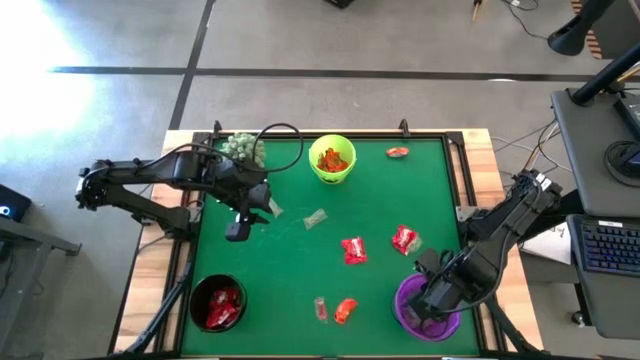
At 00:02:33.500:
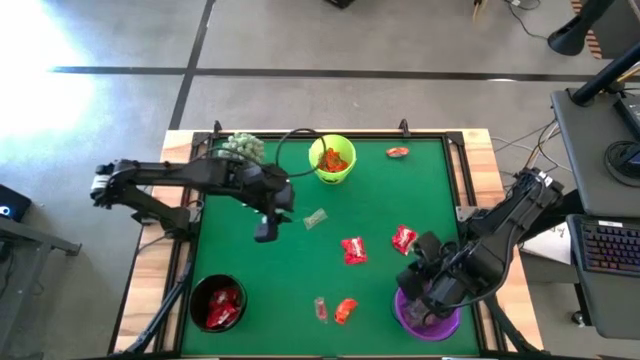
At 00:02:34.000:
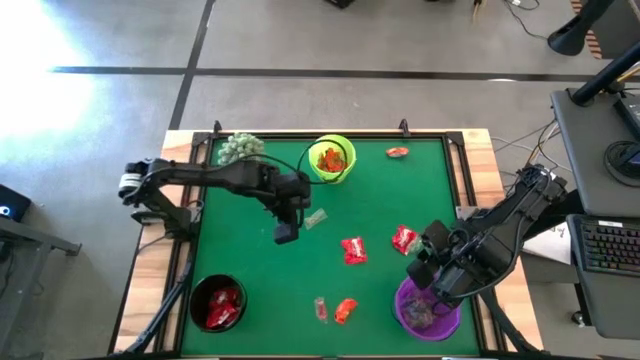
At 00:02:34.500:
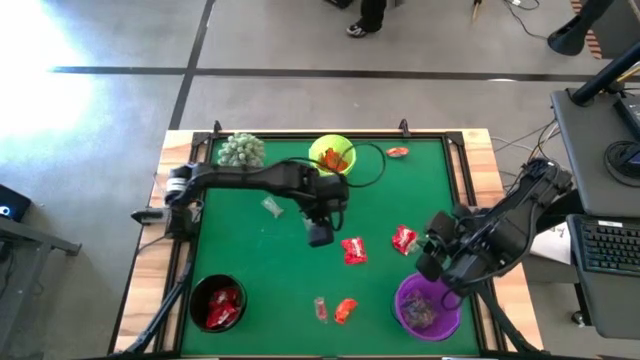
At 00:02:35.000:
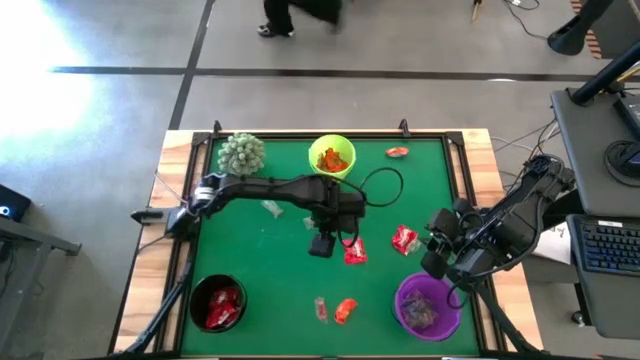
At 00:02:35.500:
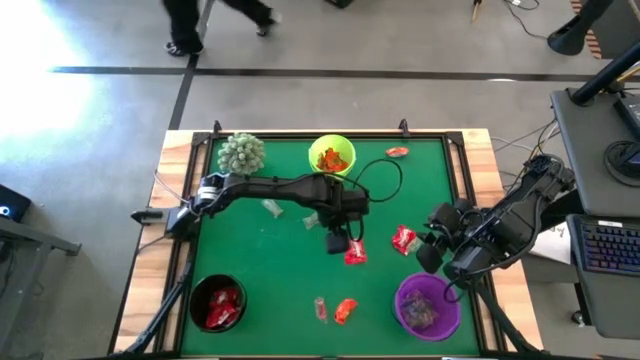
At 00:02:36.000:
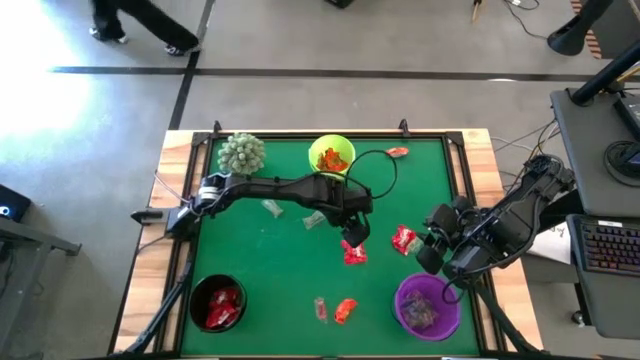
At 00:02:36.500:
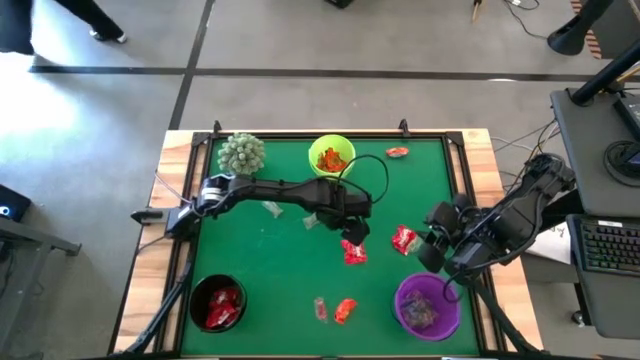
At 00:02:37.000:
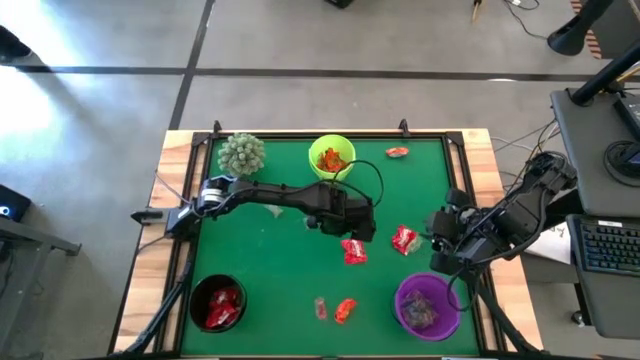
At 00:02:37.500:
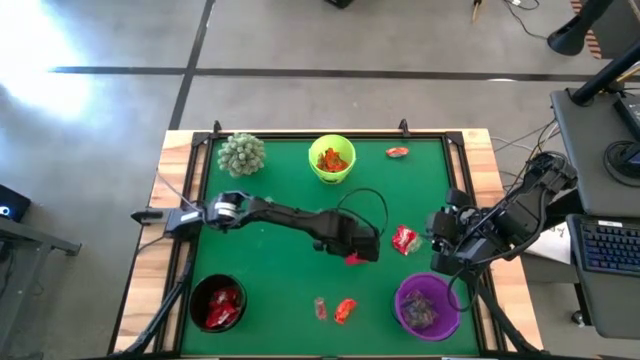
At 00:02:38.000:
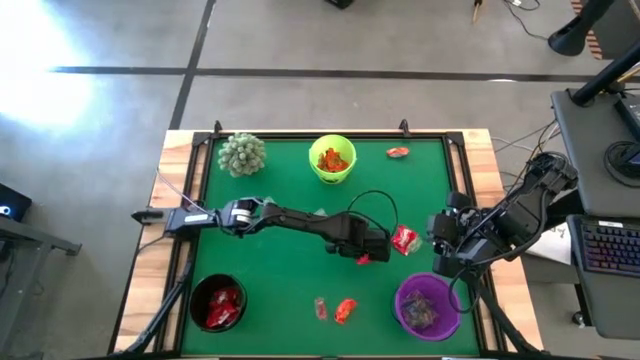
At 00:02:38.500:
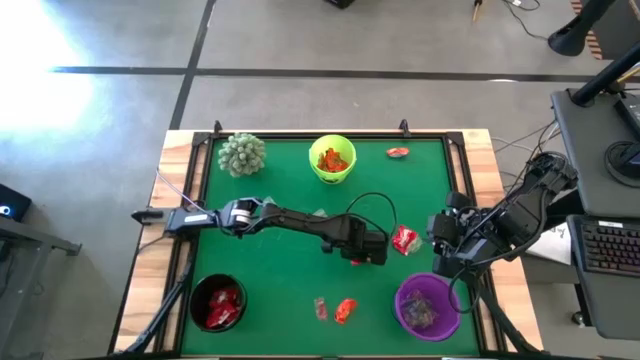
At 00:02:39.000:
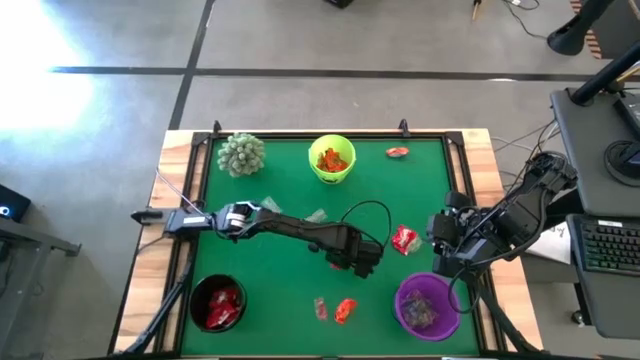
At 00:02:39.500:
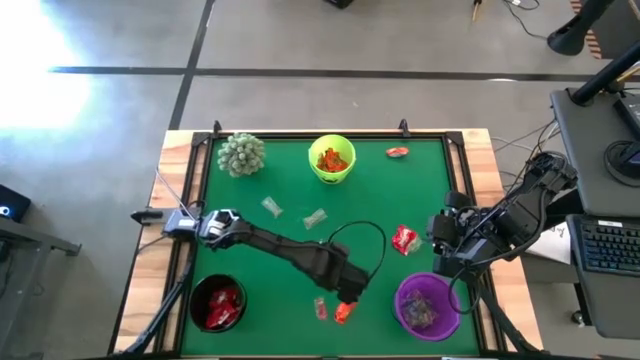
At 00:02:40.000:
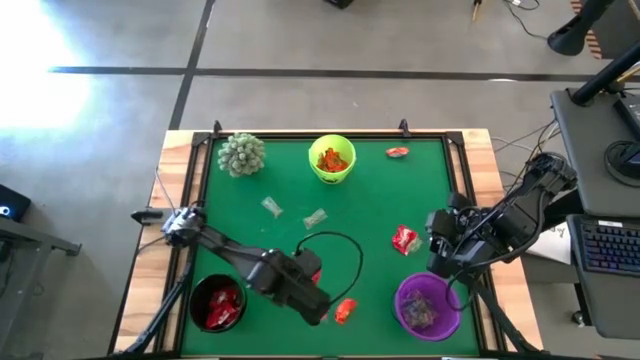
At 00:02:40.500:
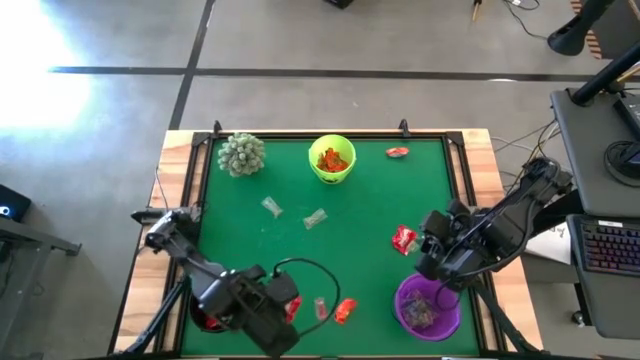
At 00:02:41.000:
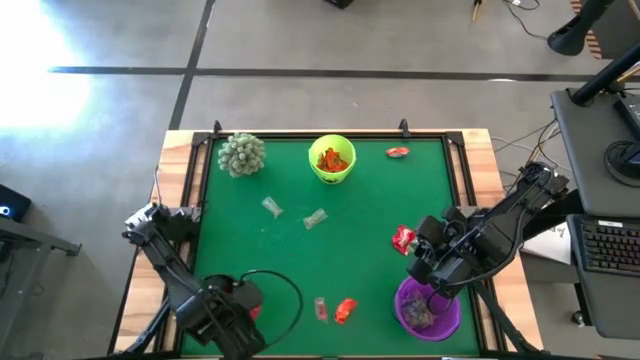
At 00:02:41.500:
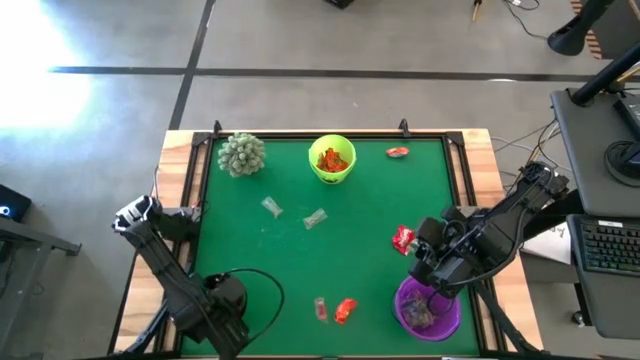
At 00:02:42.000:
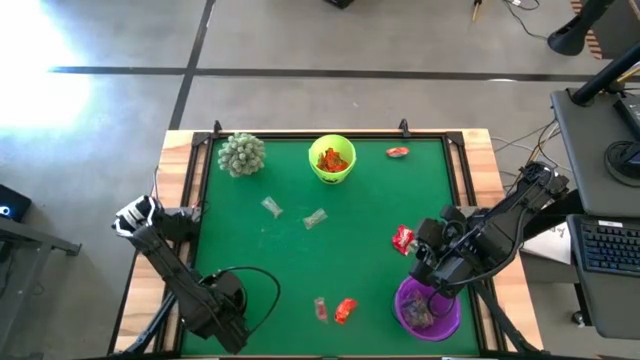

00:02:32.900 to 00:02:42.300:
Task: Organize candy in baskets
Put the red candy into the black bucket

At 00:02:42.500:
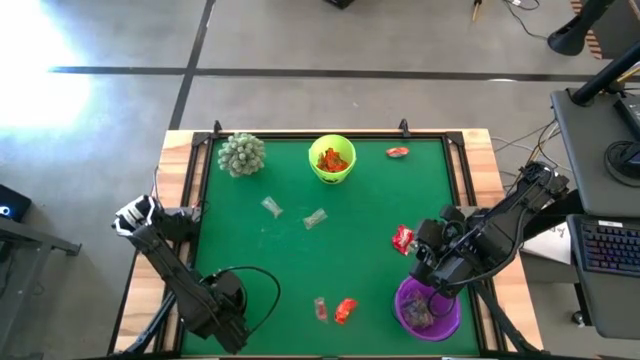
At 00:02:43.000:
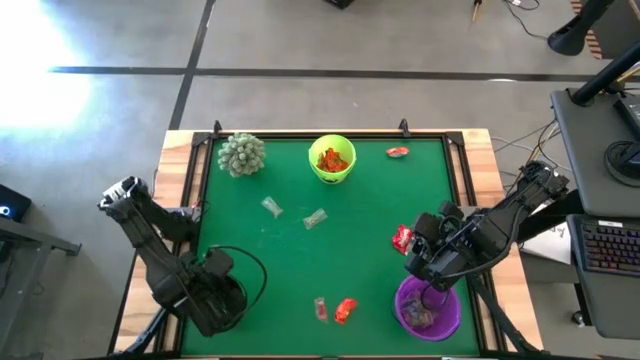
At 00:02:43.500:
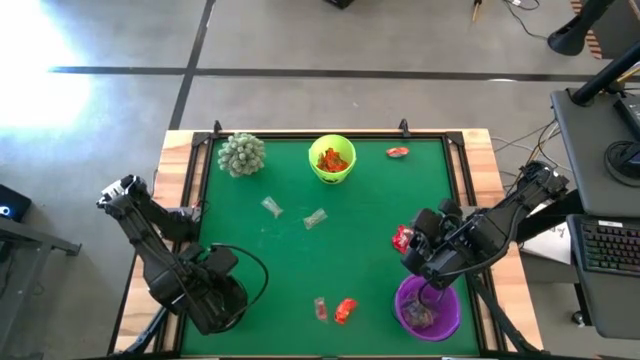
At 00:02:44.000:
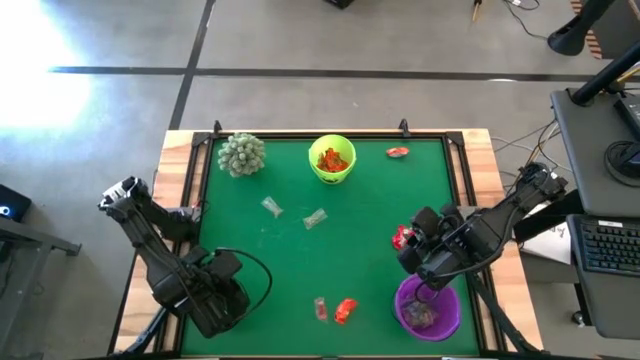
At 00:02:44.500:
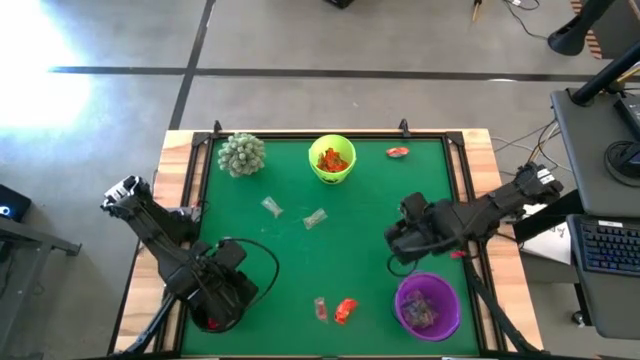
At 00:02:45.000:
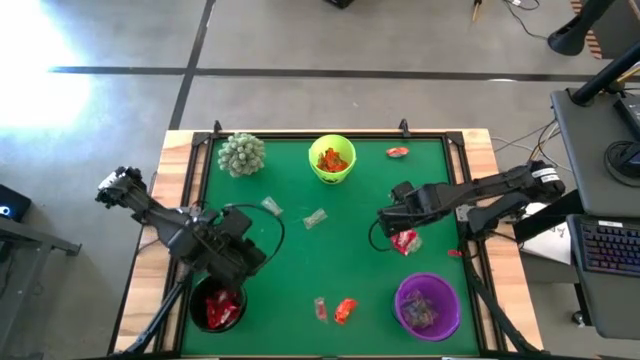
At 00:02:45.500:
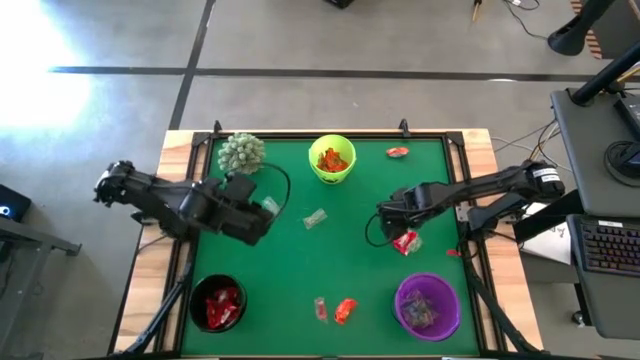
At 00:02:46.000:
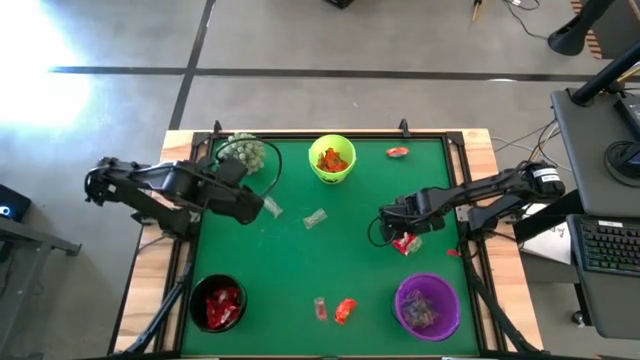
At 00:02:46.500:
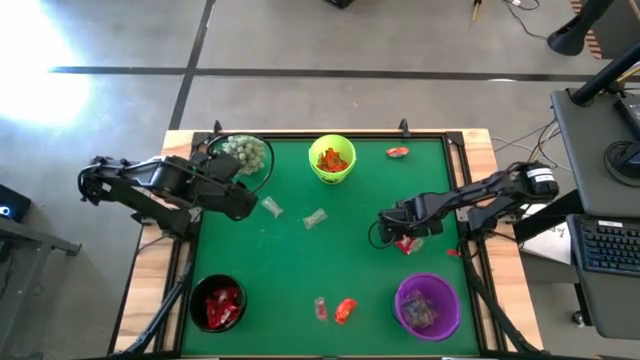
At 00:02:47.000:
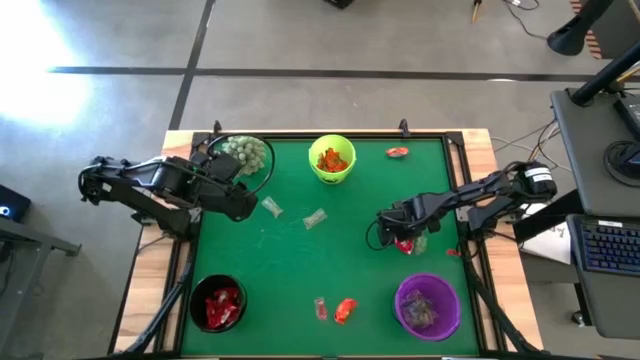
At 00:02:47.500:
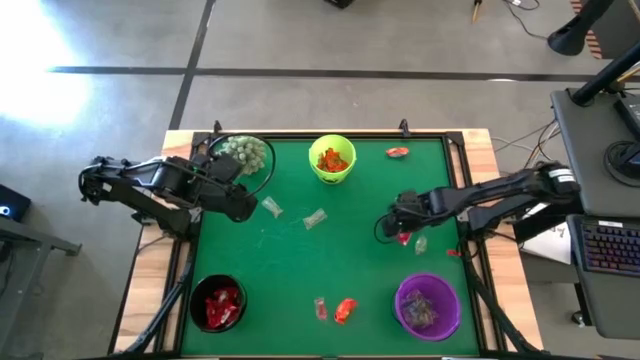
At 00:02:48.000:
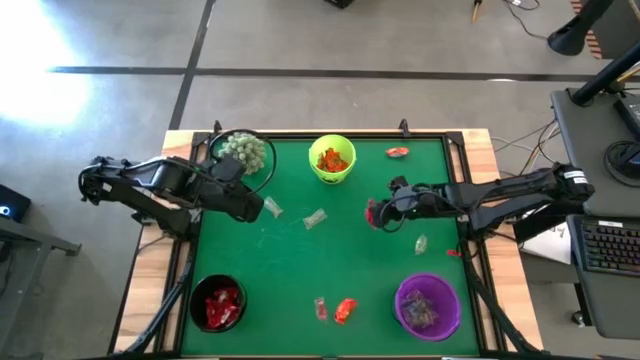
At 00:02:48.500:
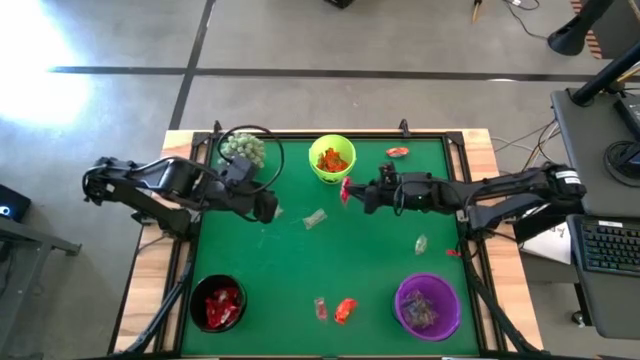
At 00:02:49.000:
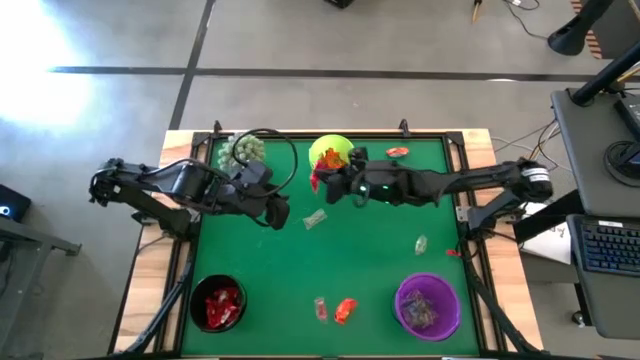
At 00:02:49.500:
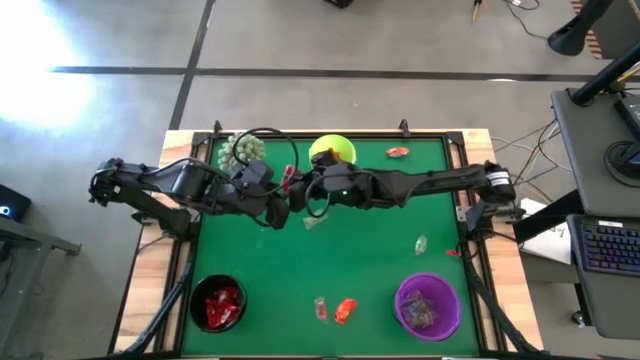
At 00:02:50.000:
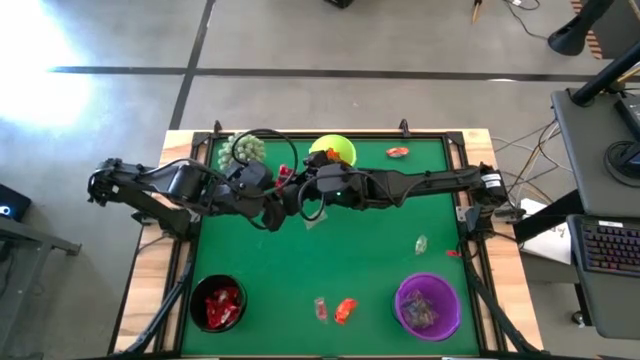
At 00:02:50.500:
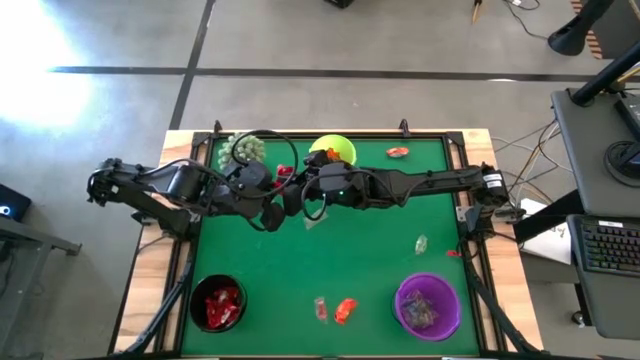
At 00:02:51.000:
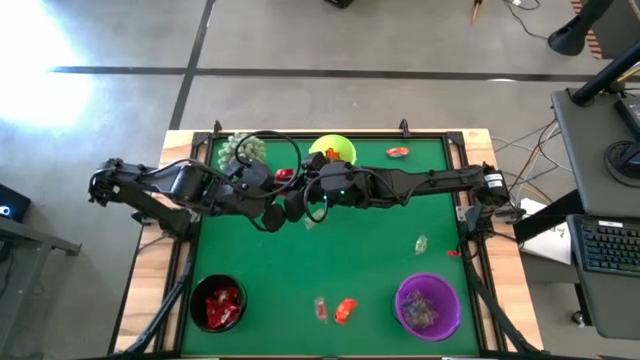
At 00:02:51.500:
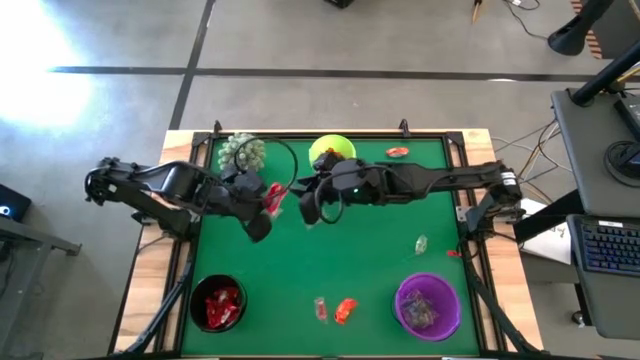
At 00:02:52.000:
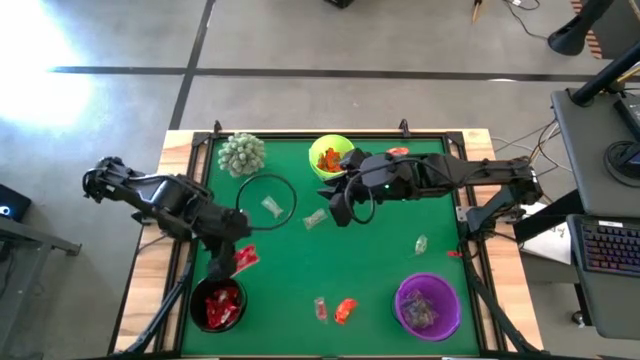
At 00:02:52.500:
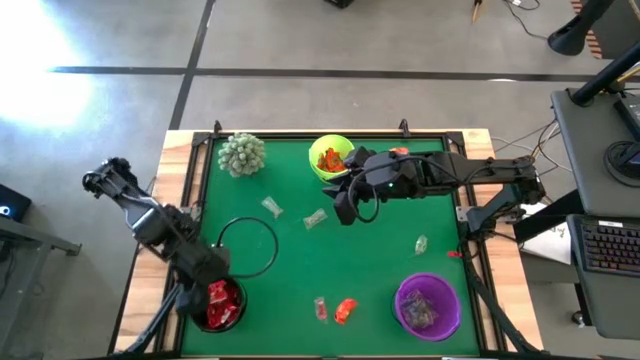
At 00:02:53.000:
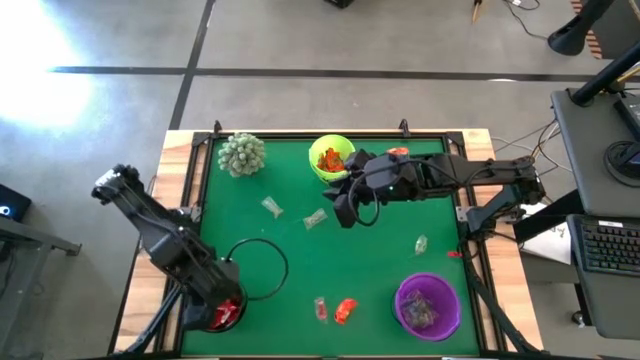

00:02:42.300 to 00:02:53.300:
Put the red candy into the black bucket
